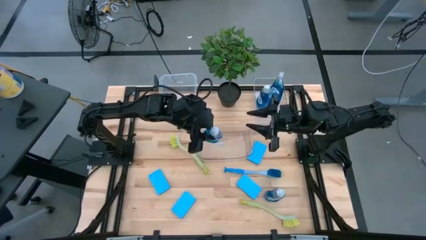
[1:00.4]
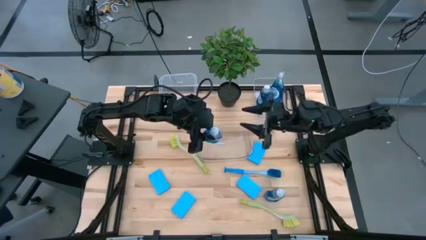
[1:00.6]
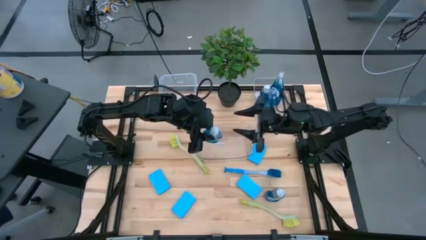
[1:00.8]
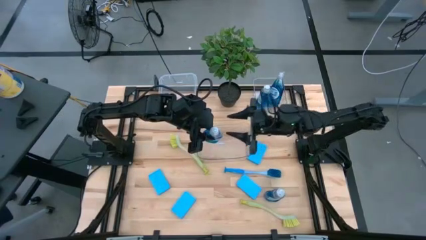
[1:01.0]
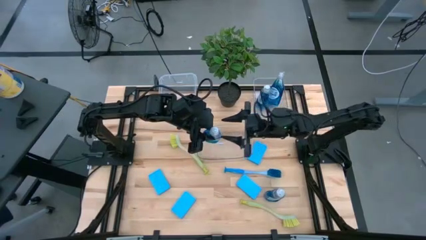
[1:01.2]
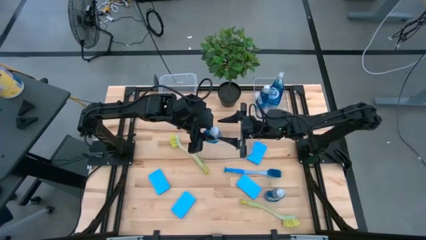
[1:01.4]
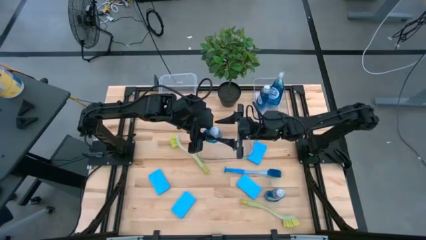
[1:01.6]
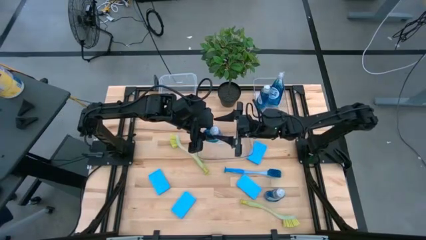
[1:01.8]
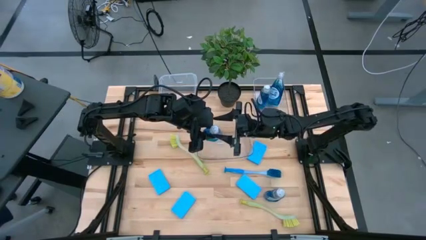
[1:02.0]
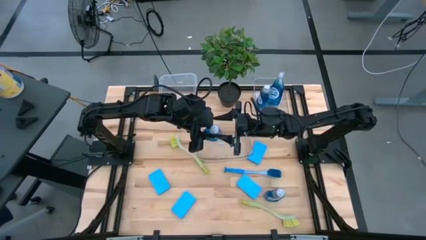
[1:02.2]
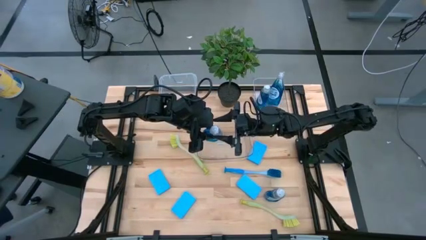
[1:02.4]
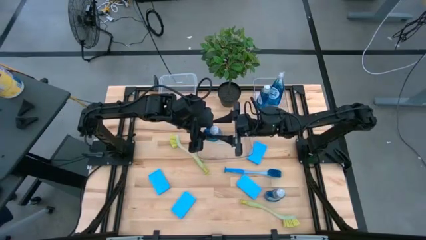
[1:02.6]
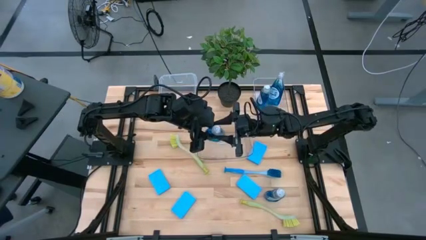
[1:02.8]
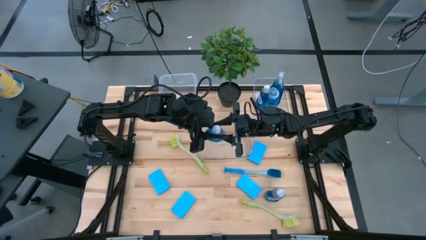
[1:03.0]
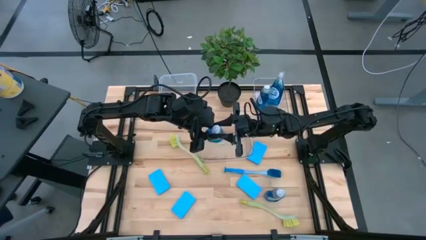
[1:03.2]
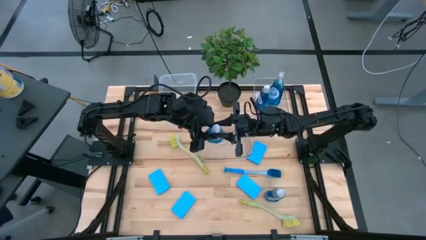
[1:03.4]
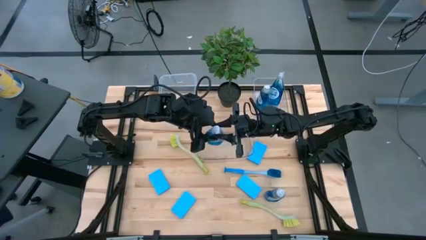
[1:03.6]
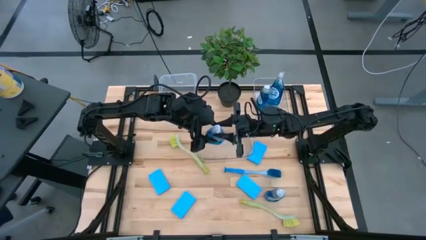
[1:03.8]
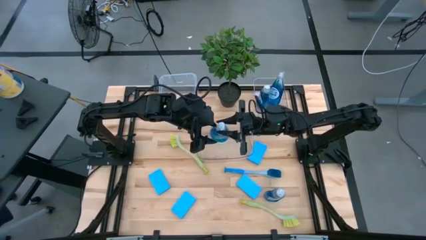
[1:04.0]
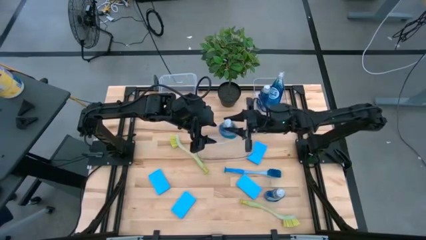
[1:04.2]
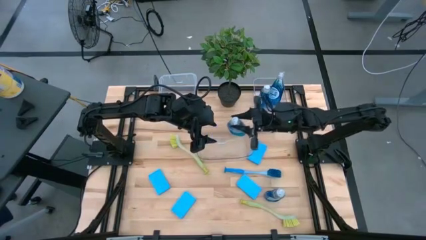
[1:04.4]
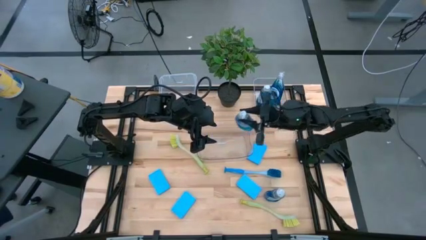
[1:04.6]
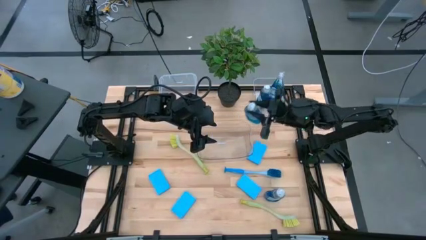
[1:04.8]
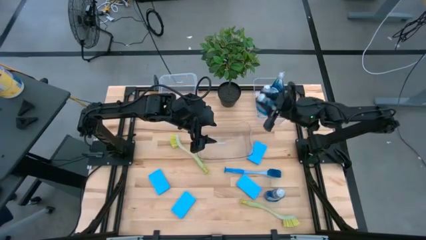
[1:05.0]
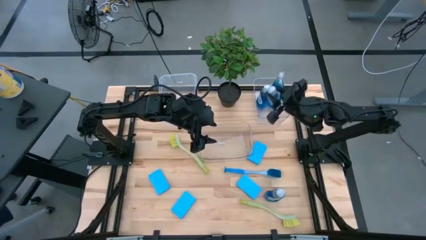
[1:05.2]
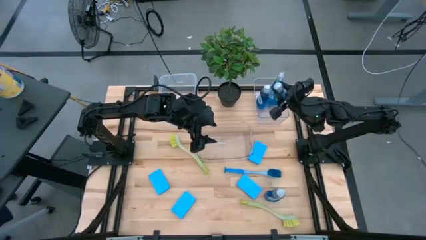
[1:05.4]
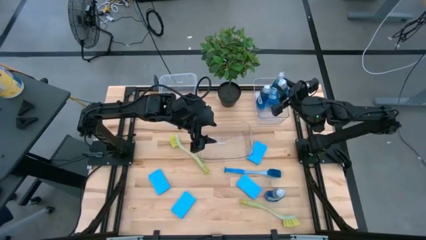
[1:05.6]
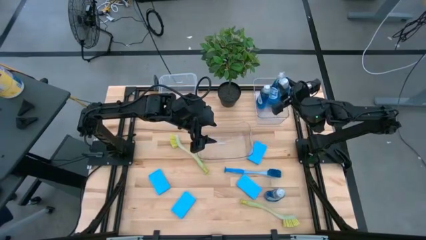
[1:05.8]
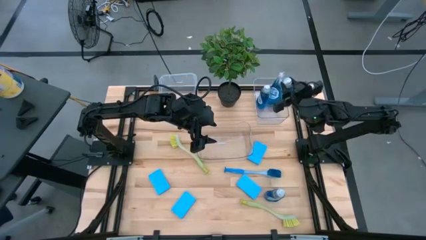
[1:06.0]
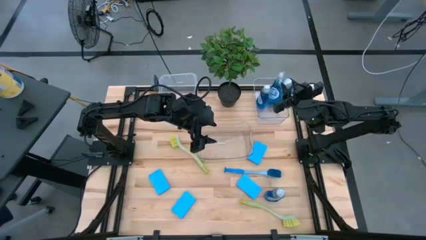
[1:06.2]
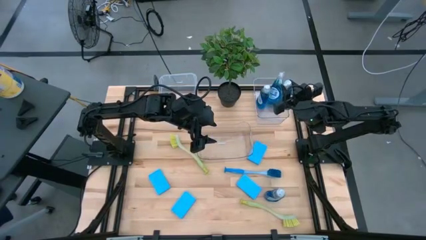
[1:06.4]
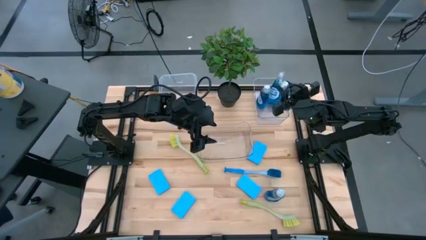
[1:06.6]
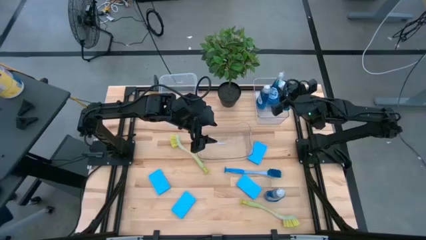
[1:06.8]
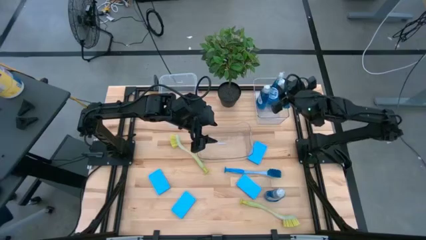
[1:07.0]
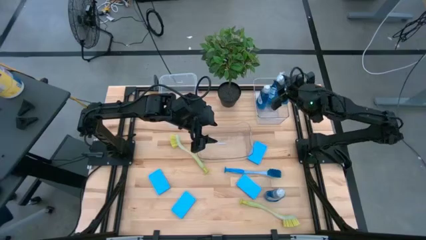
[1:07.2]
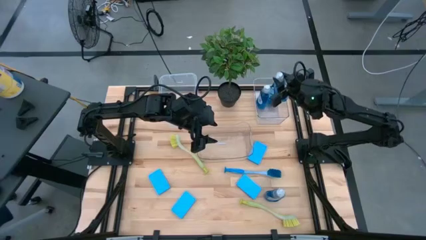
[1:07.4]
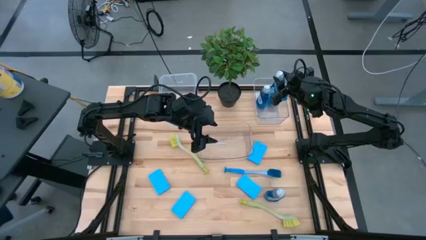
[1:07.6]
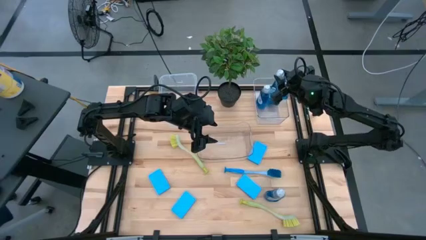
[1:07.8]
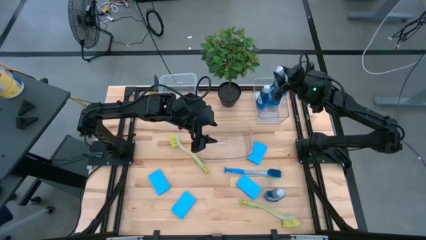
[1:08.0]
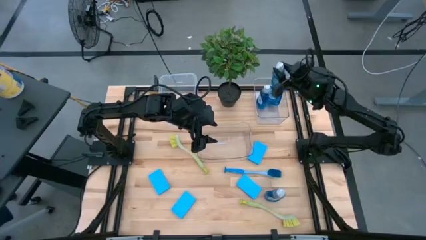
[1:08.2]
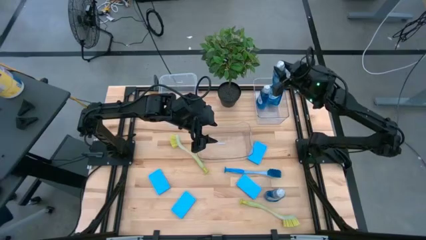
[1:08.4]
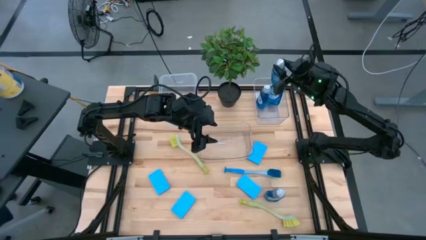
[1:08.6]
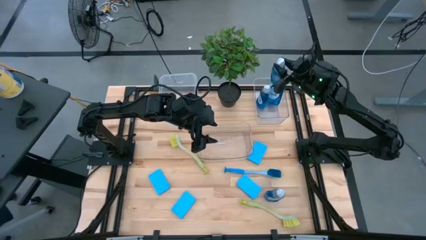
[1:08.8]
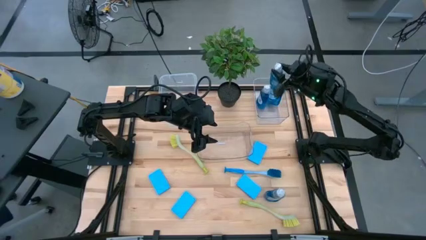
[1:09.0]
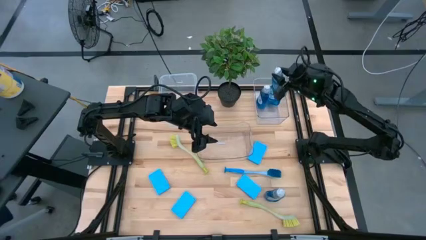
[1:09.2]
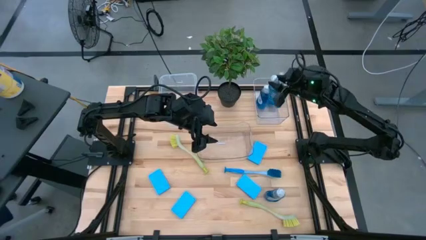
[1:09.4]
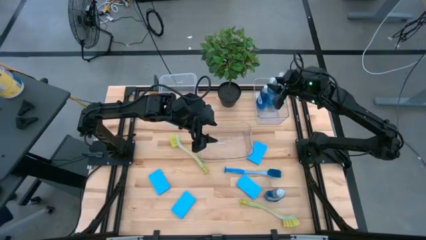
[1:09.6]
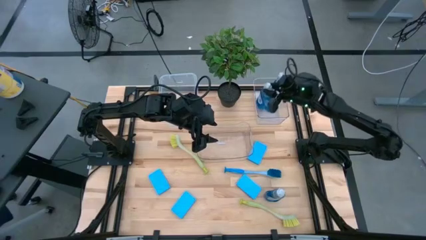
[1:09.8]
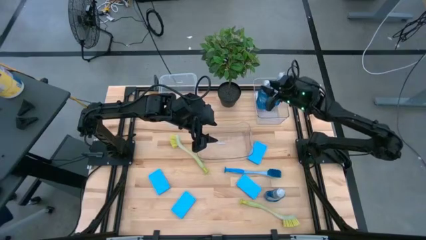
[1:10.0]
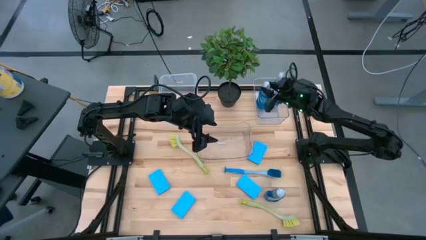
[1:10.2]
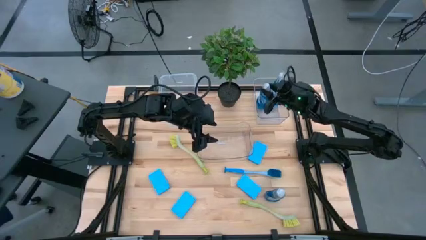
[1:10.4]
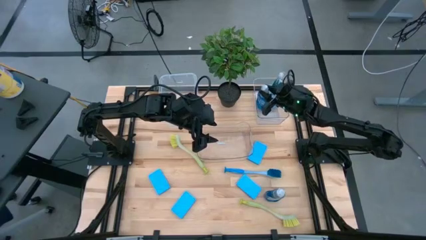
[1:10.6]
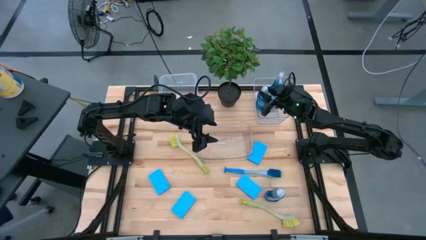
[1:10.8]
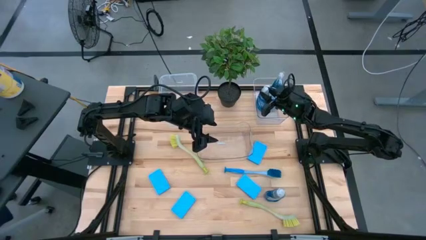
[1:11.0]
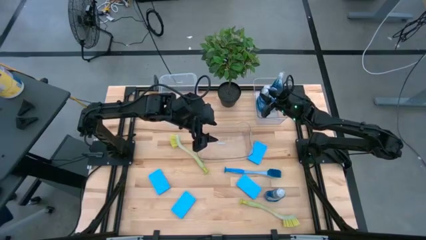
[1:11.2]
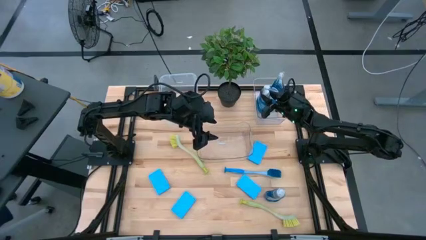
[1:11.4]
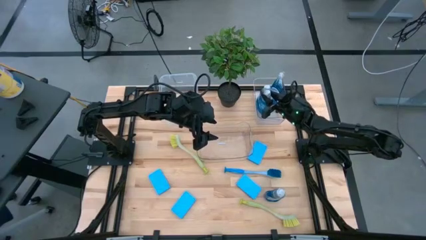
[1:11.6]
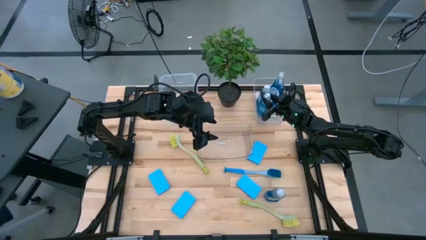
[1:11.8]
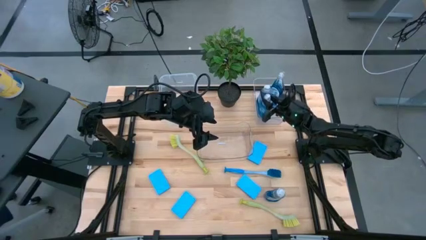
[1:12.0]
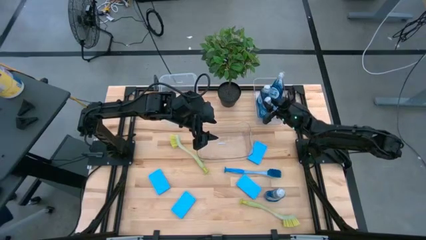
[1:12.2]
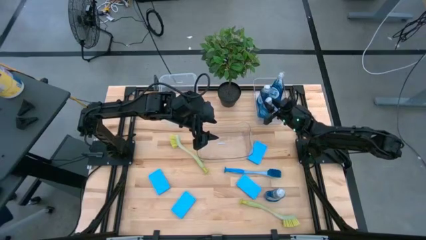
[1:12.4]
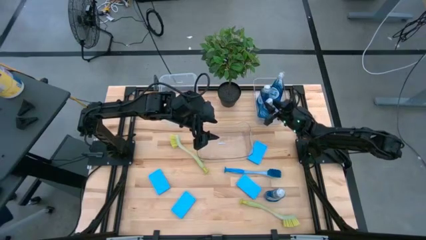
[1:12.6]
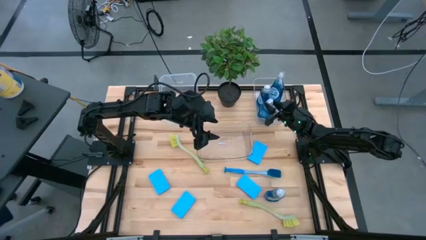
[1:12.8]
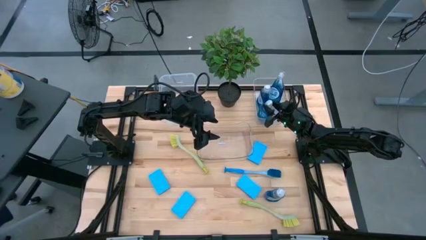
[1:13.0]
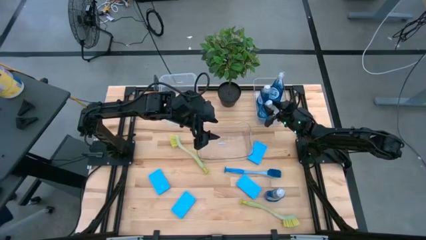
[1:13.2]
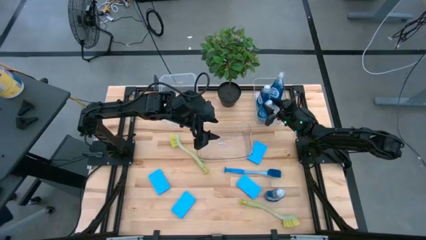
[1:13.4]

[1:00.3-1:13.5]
Task: Pick & Place Kitchen Sink Supplies
Put the dish soap into the top transparent bin

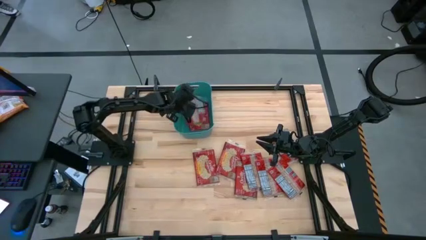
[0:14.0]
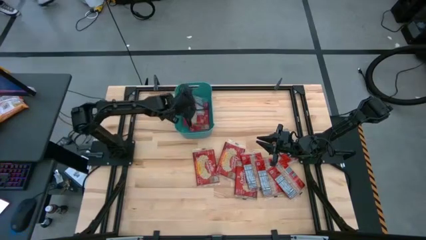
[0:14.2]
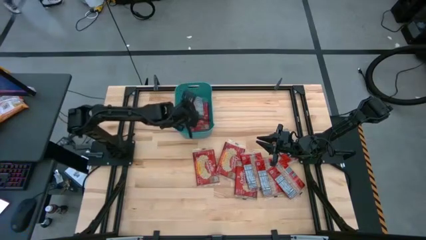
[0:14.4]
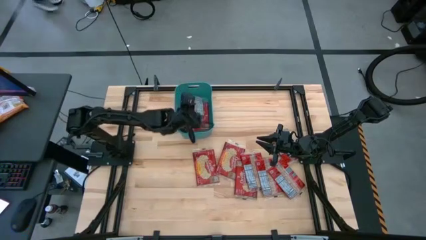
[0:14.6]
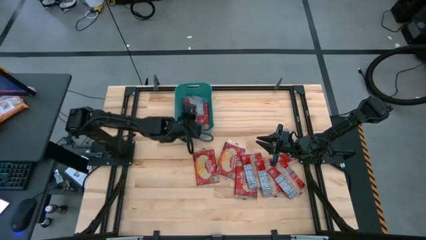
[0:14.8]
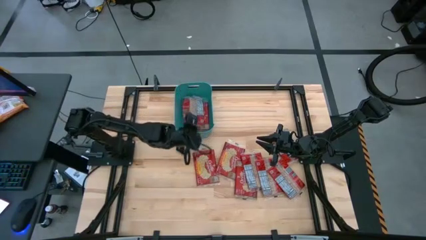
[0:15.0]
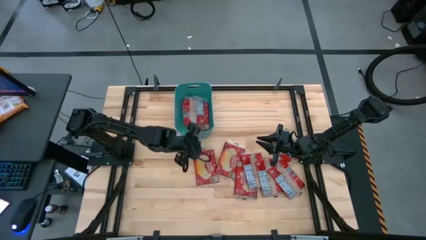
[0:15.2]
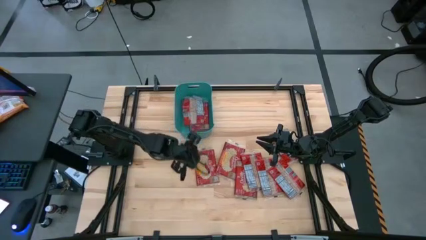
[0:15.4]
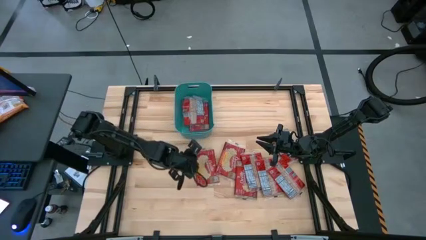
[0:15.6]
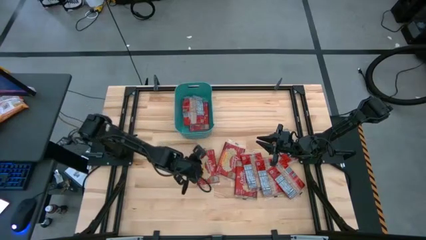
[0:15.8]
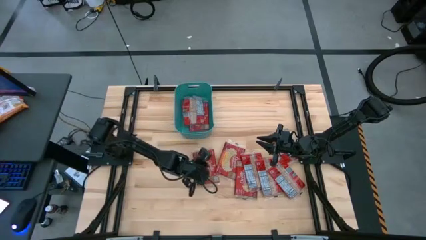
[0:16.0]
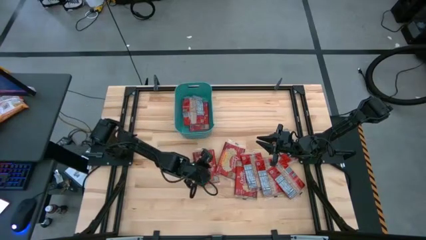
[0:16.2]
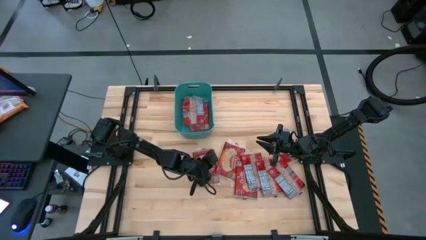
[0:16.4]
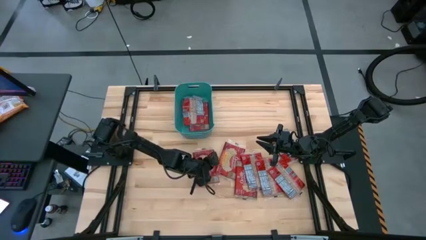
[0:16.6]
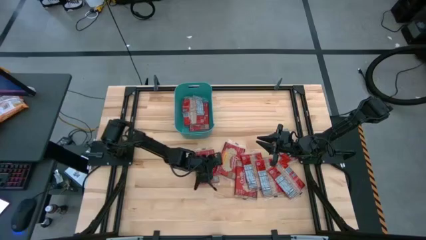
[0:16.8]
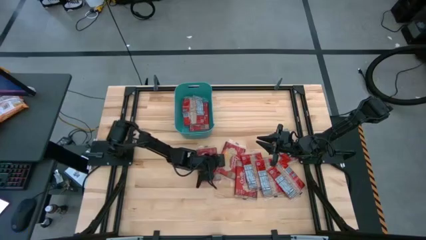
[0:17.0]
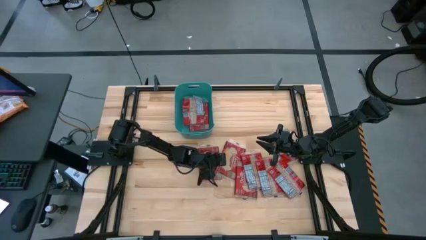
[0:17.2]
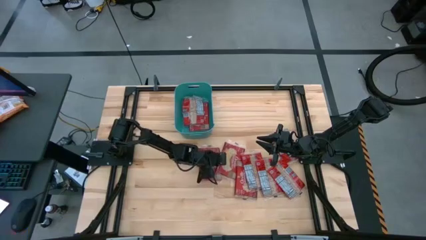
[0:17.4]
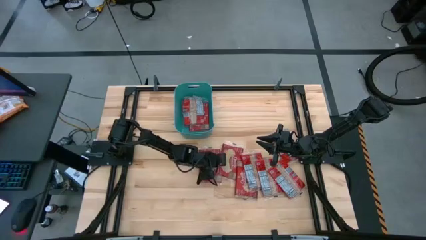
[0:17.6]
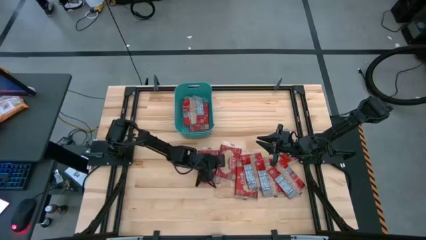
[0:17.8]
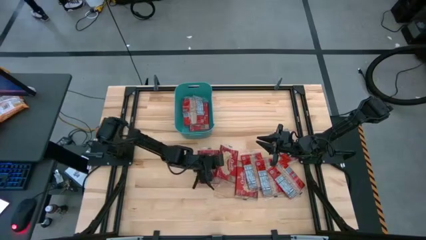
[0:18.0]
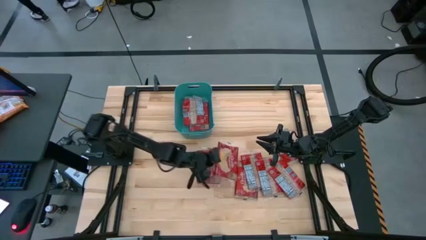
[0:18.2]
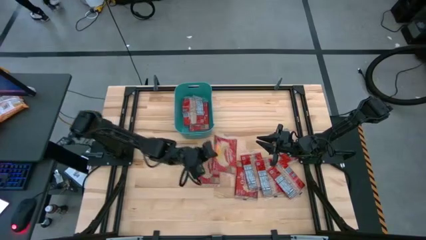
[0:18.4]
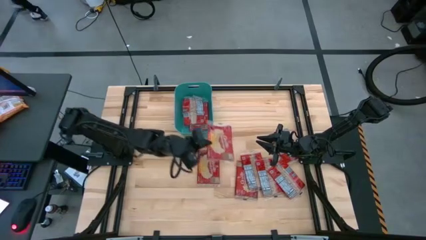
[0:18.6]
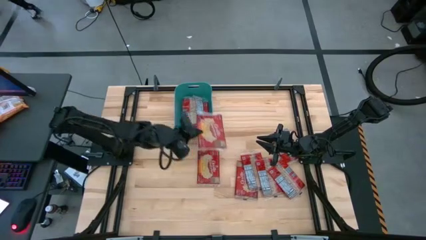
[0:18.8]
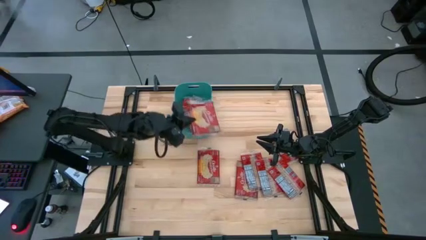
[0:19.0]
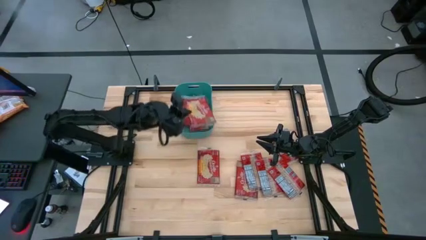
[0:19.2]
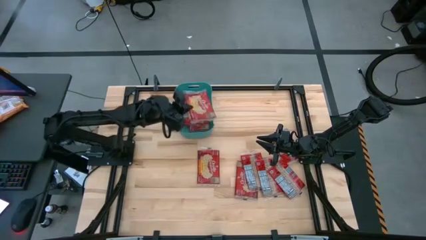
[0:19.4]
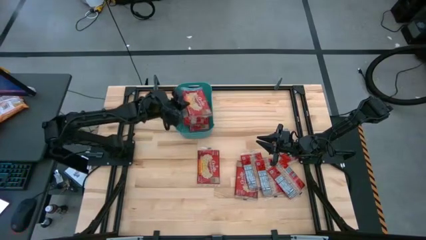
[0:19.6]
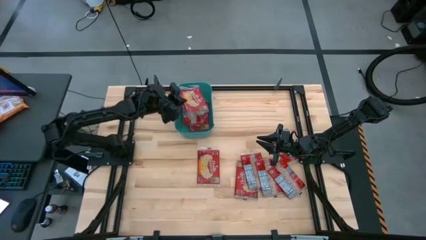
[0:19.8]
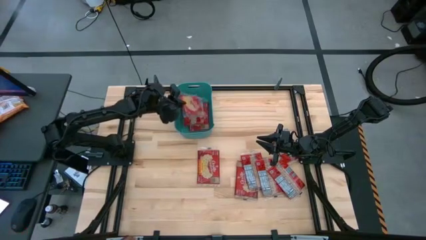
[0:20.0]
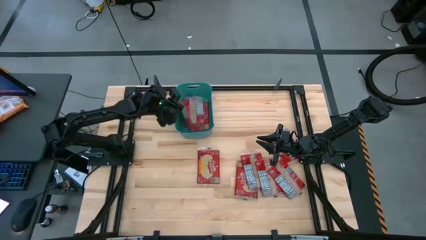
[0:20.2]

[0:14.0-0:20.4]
Task: Sort popcorn bags into baskets
Put the red popcorn bag into the green bin
